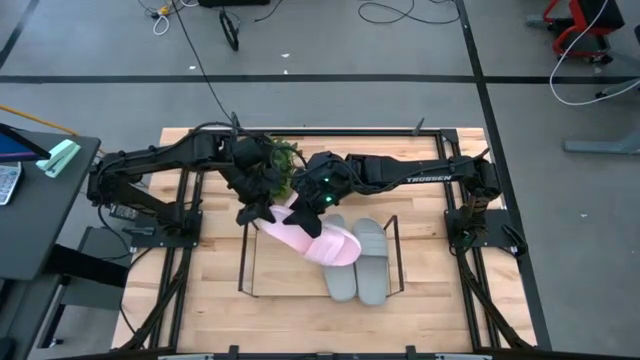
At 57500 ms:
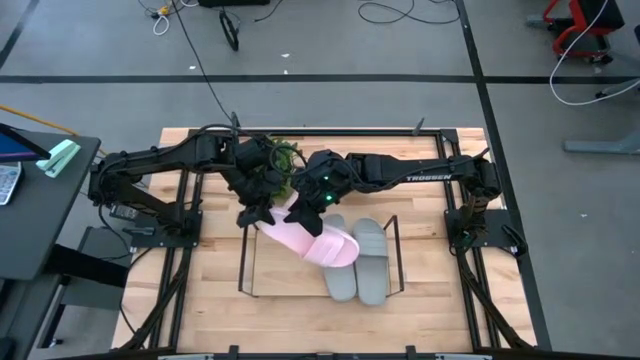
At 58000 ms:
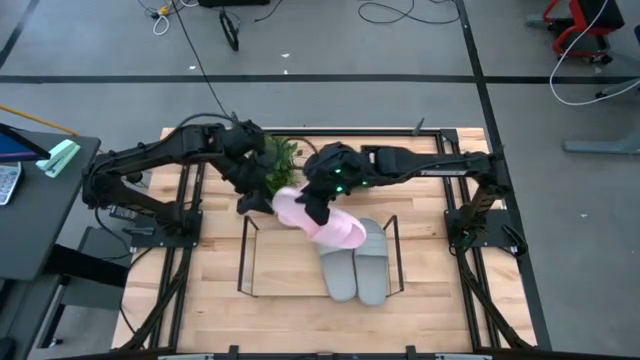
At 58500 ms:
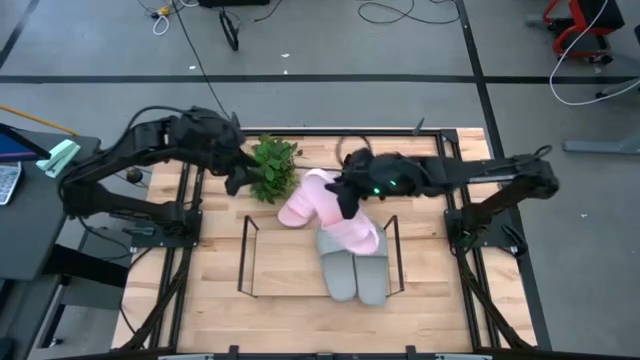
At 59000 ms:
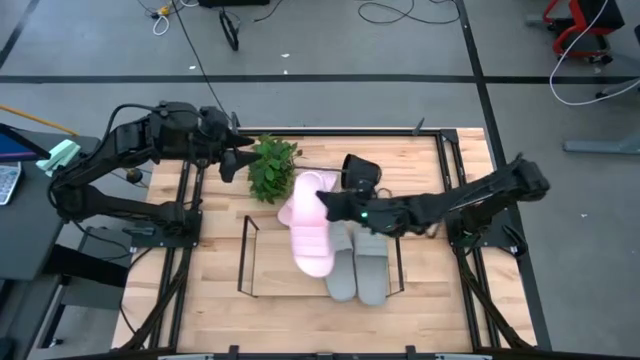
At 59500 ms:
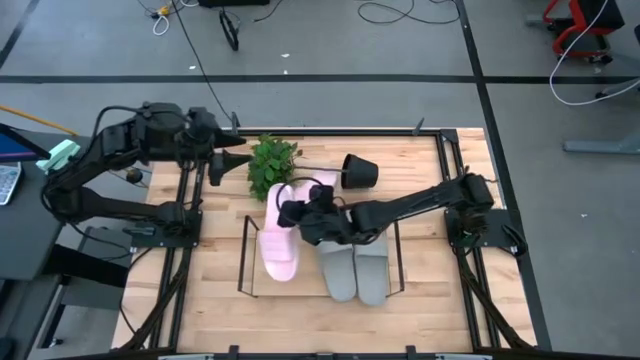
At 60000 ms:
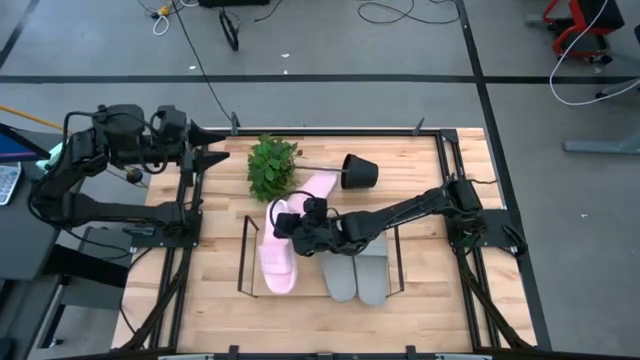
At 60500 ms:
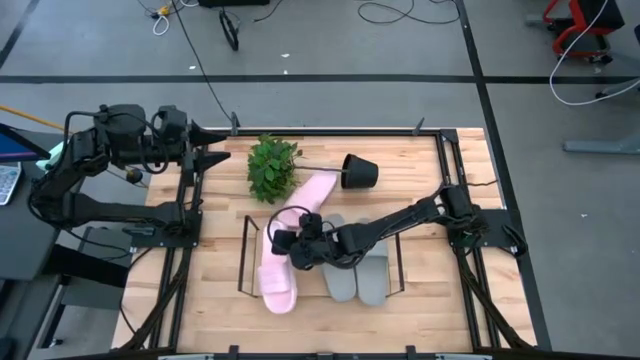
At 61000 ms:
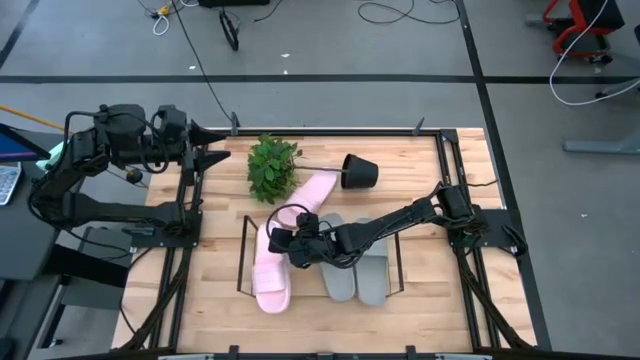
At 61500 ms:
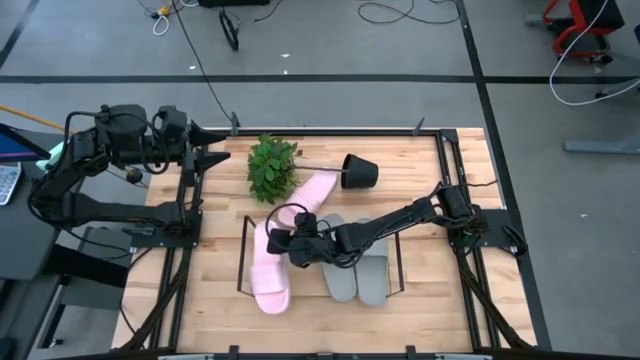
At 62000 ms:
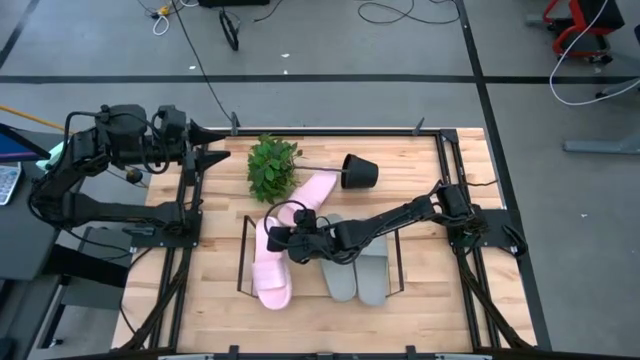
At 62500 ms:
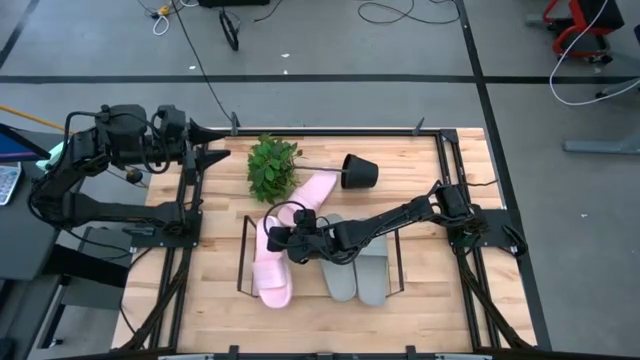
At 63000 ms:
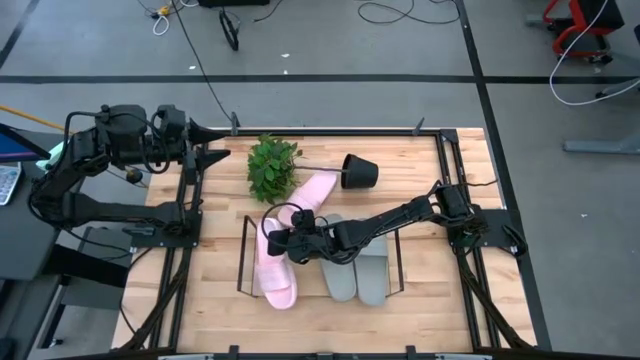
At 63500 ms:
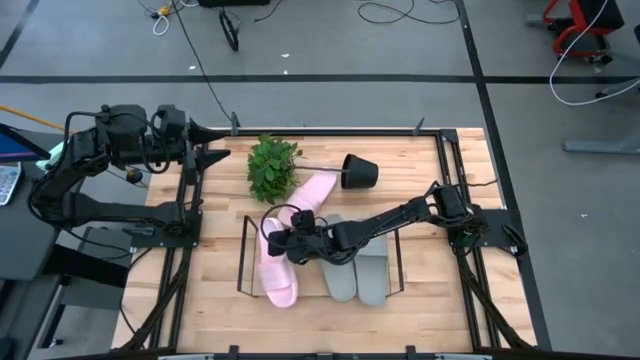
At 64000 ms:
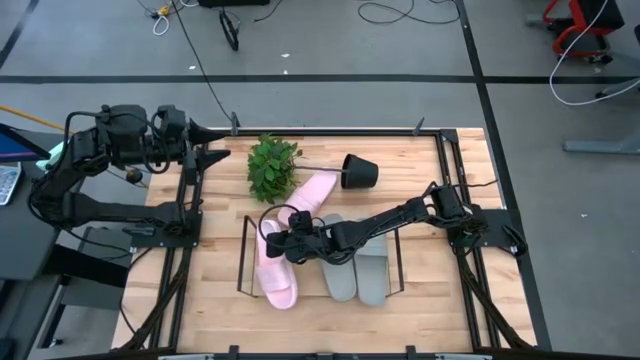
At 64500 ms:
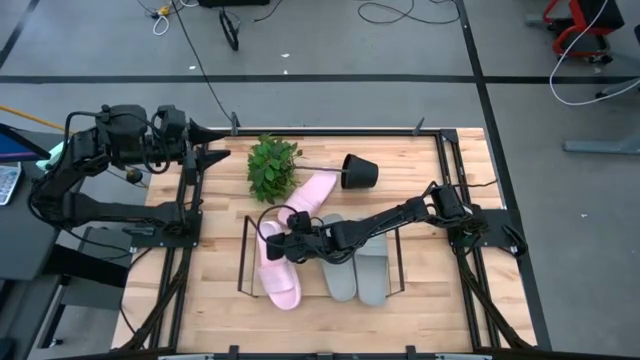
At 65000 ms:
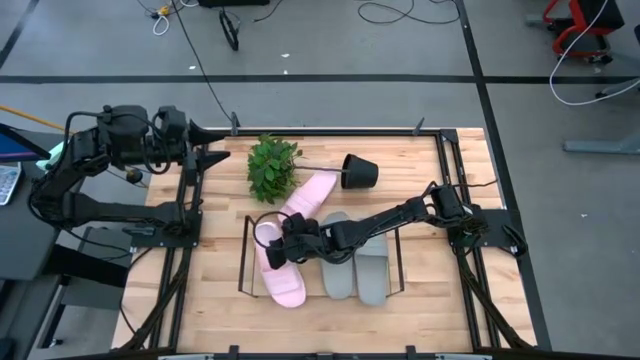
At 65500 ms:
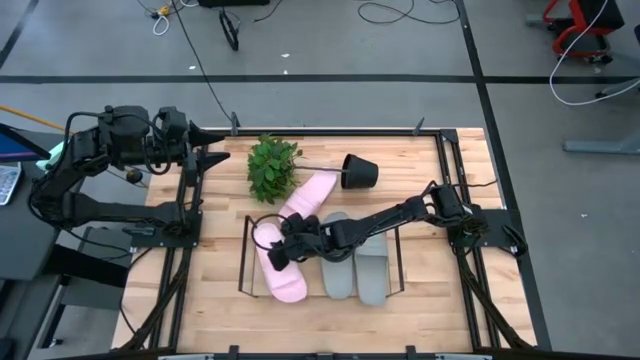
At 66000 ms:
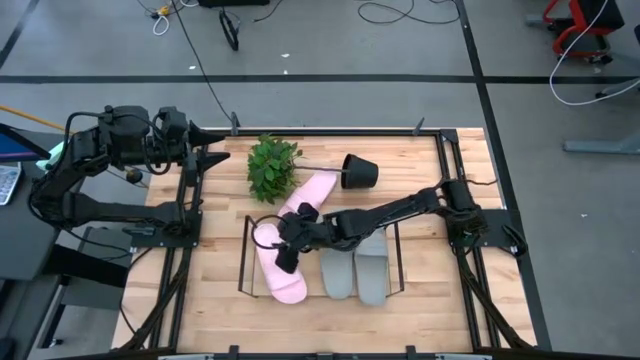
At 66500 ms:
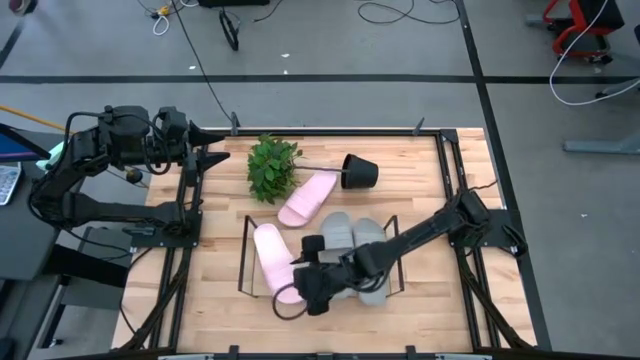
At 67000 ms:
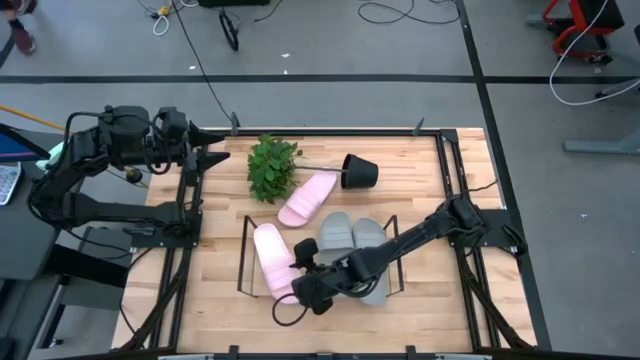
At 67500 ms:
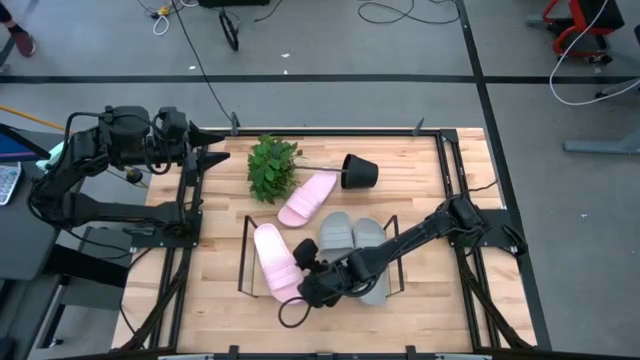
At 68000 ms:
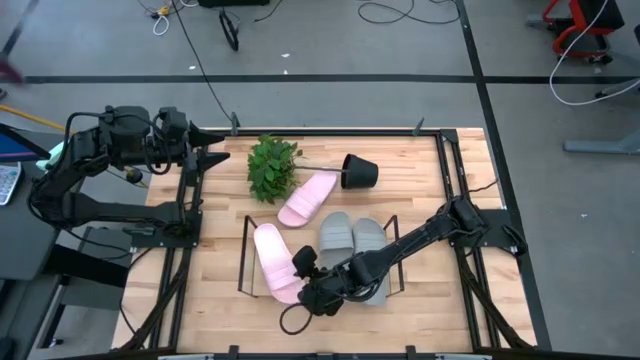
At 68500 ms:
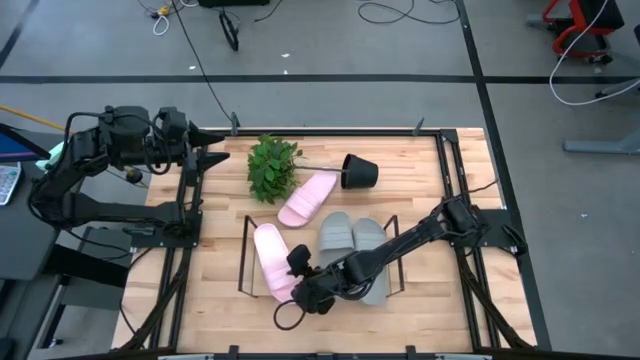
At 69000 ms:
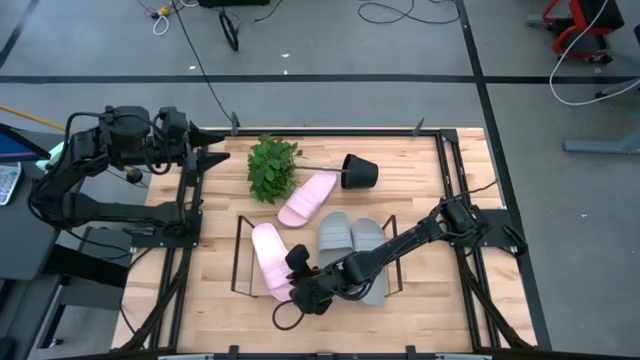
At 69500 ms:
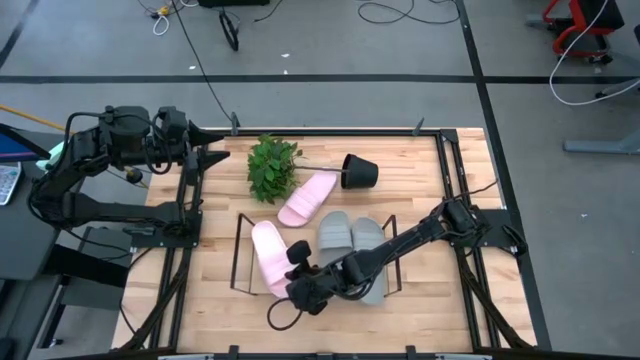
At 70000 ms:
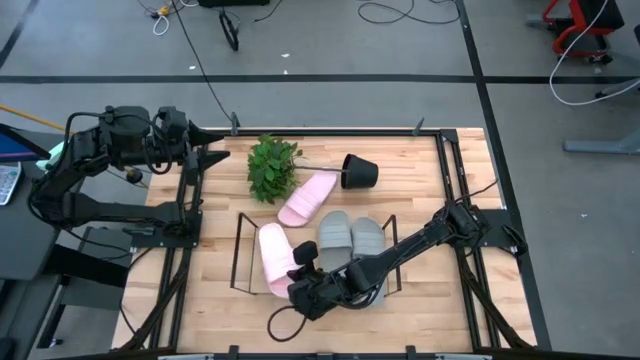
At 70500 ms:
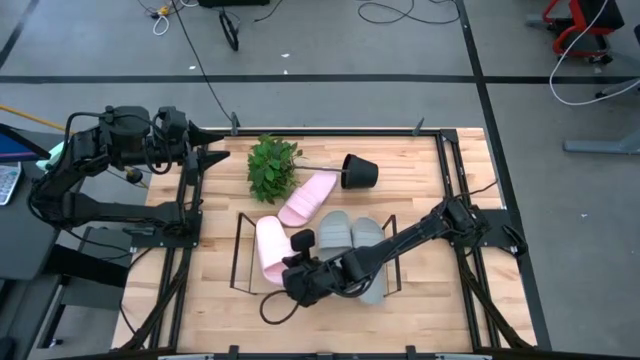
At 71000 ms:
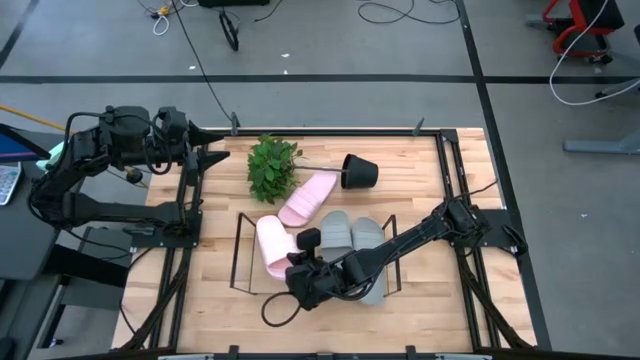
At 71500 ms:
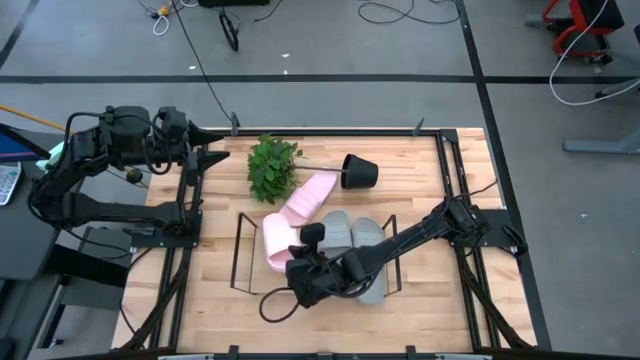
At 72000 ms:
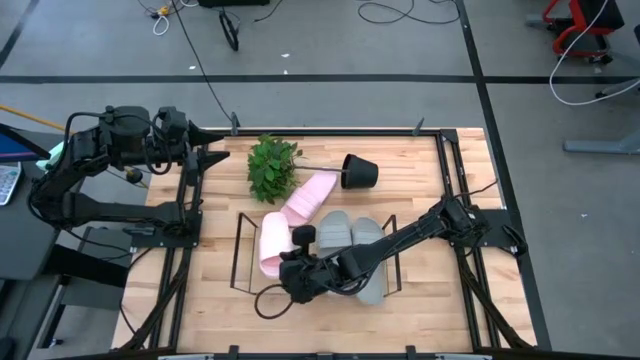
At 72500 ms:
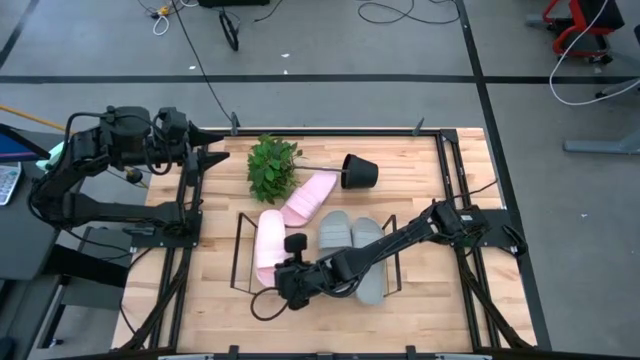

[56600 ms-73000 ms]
Task: Pick and place slides into the shelf
Put the top pink slipper on the shelf

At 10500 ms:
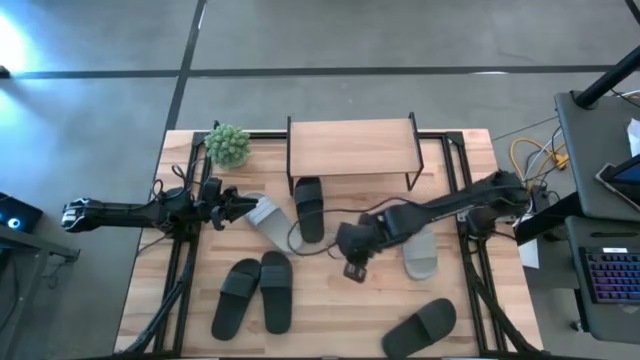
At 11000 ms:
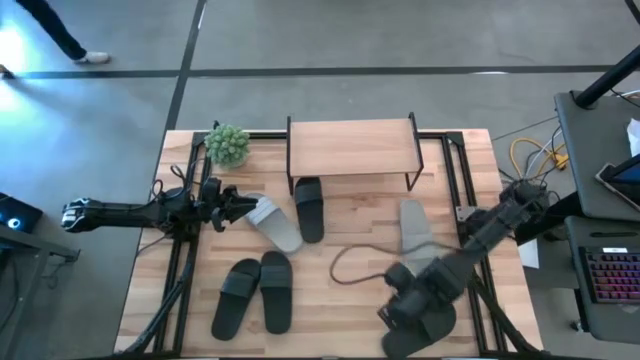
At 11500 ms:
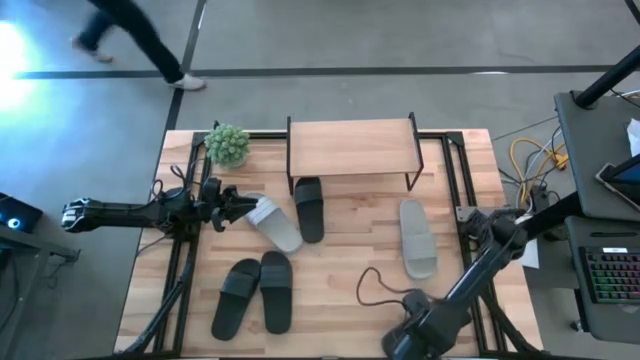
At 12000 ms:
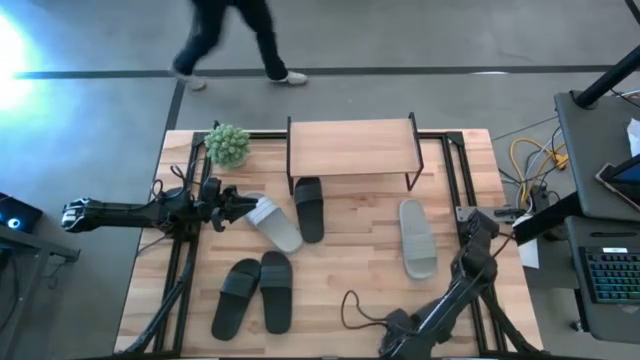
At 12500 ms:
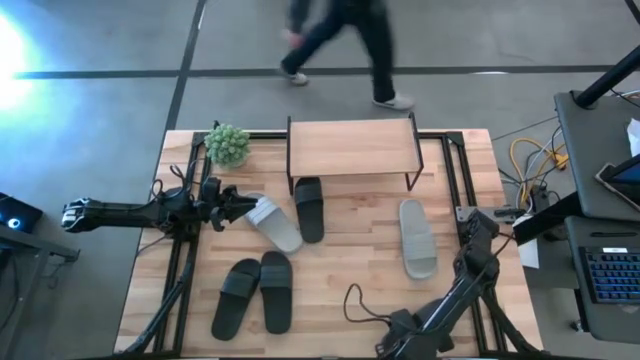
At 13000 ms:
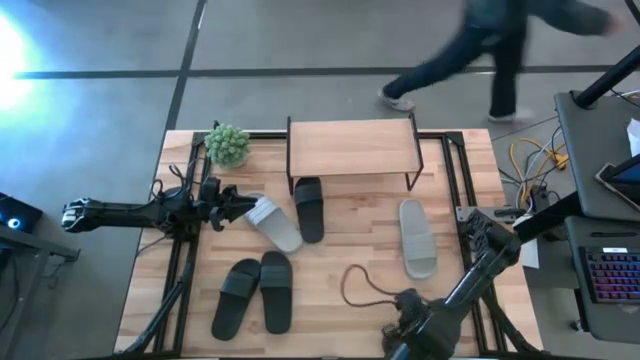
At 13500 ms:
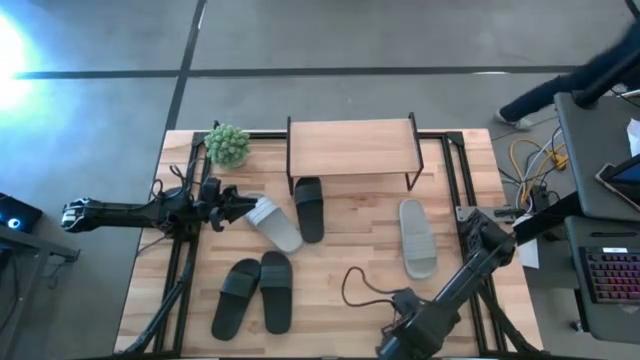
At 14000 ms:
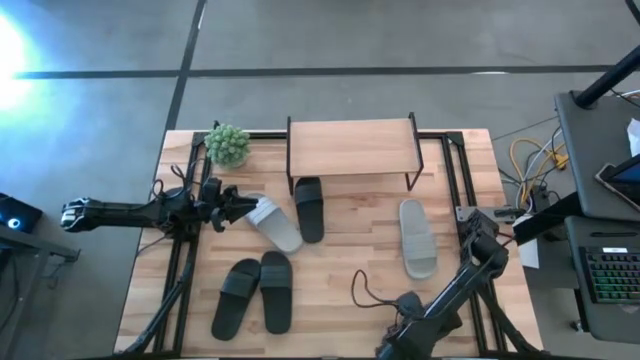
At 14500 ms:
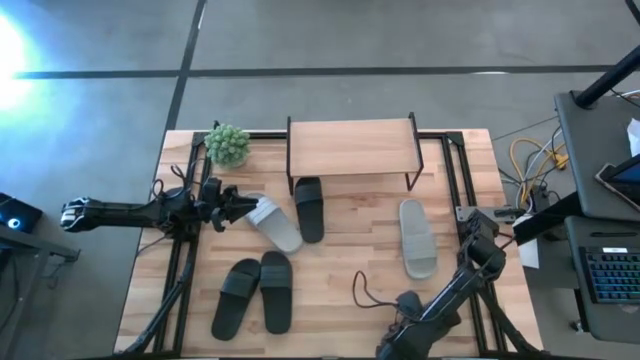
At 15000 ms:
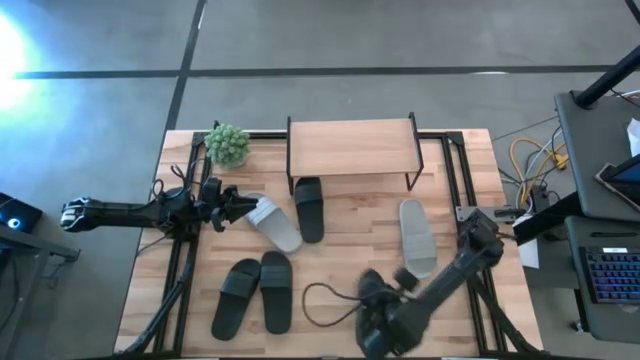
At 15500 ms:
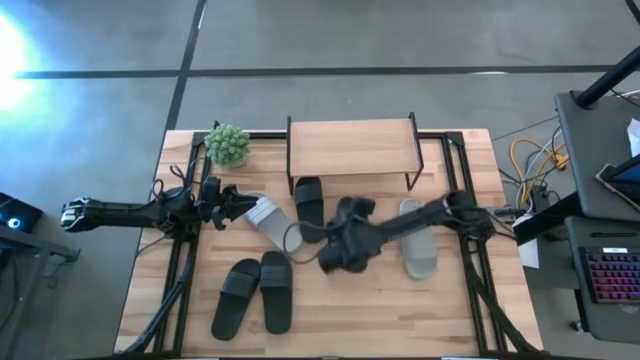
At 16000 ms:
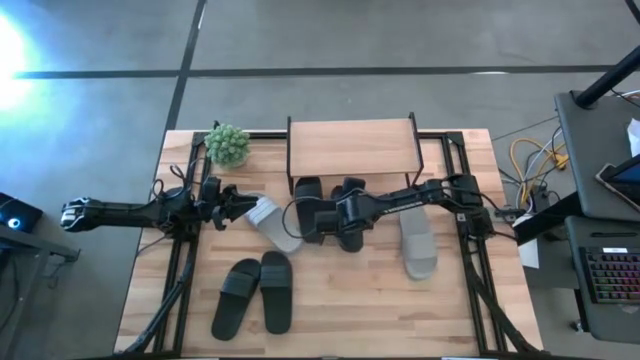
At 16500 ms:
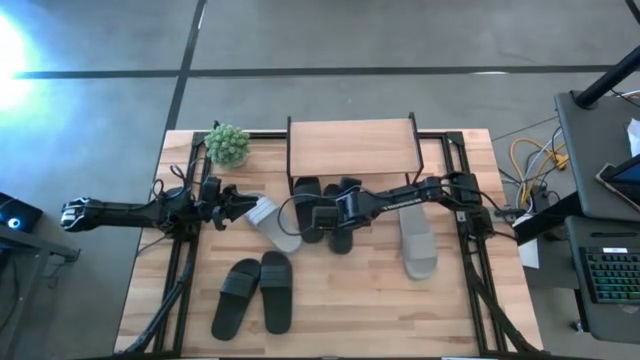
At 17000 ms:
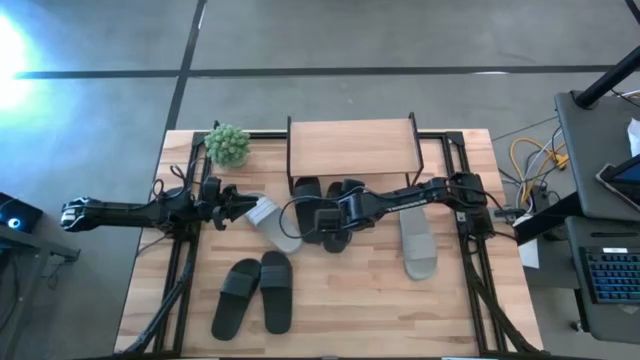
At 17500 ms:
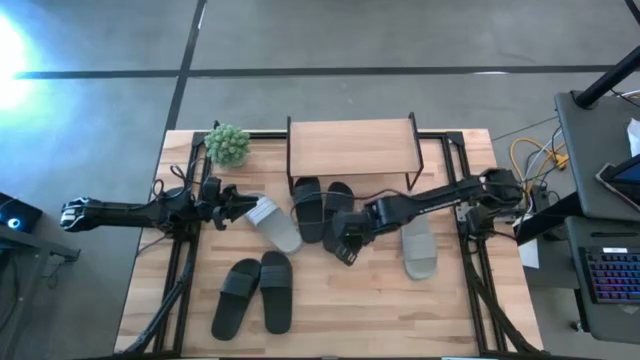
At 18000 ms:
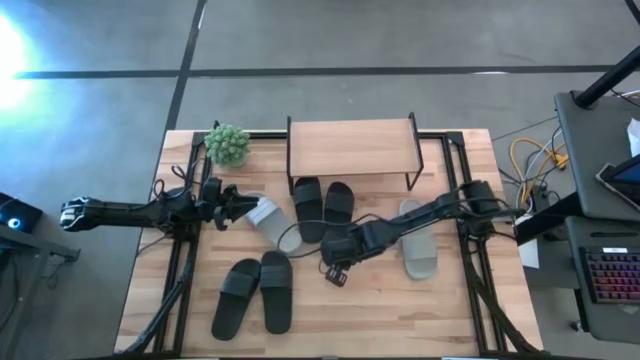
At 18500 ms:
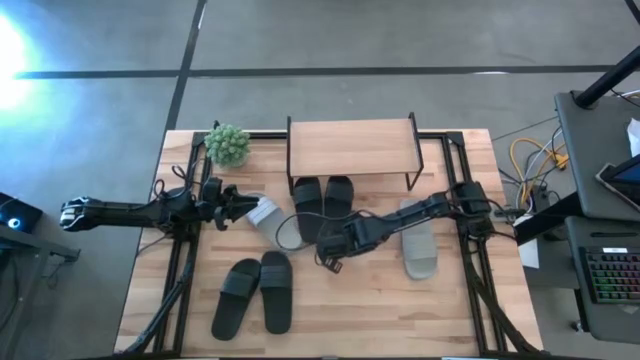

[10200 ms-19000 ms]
Task: Pick and place slides into the shelf
Put the black slide under the shelf
